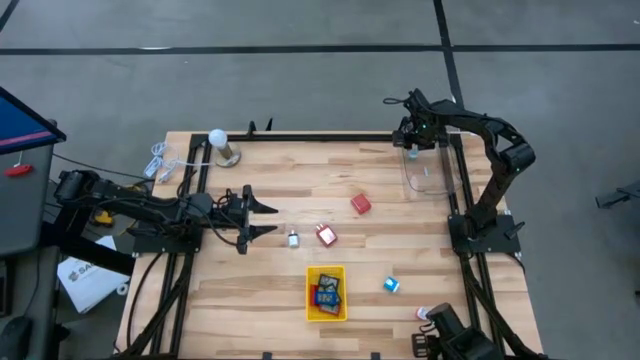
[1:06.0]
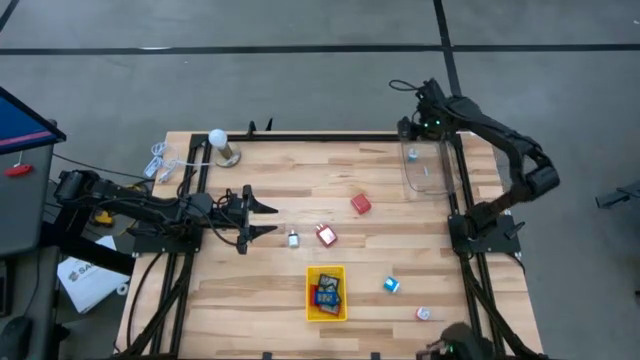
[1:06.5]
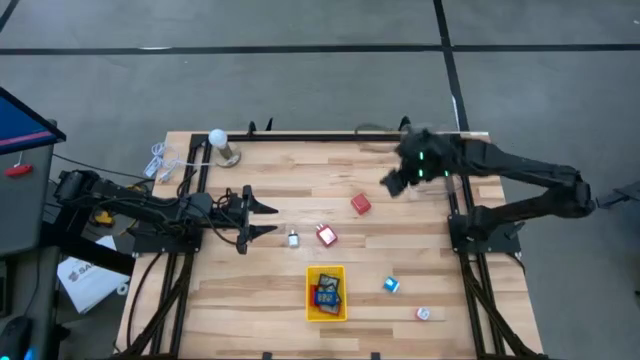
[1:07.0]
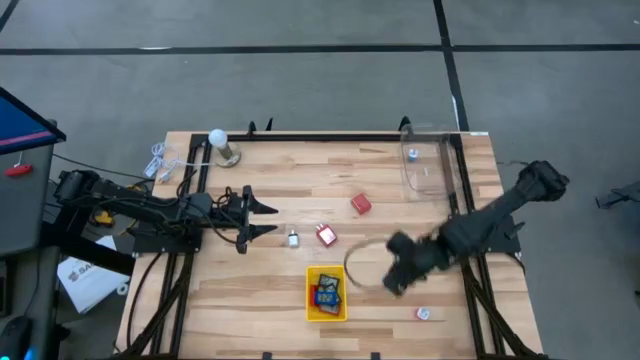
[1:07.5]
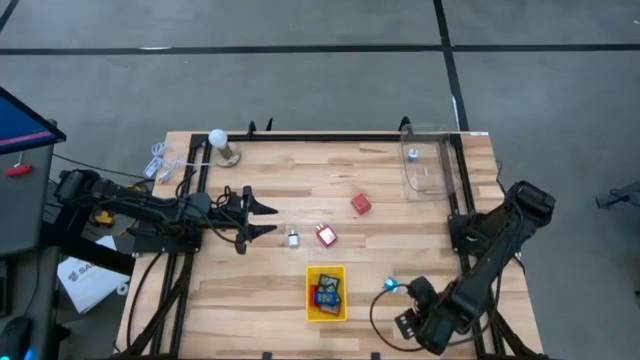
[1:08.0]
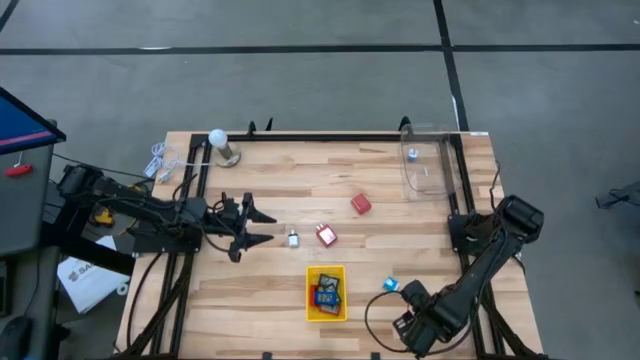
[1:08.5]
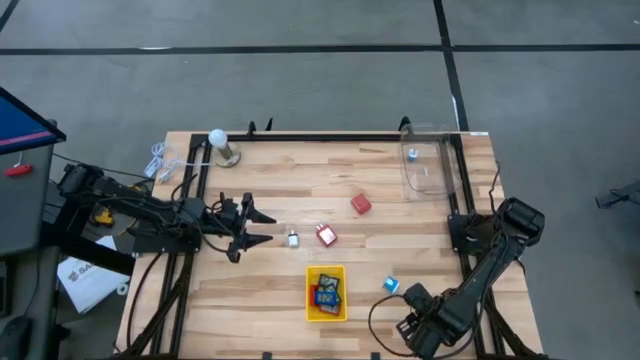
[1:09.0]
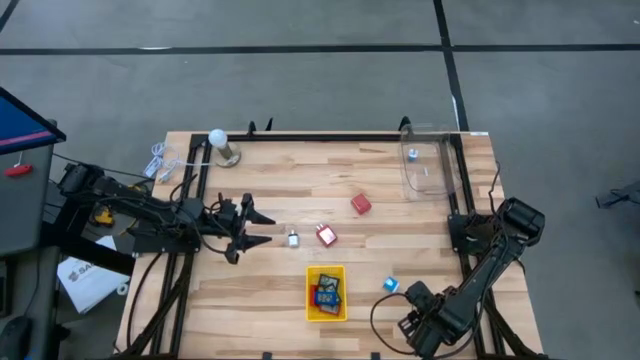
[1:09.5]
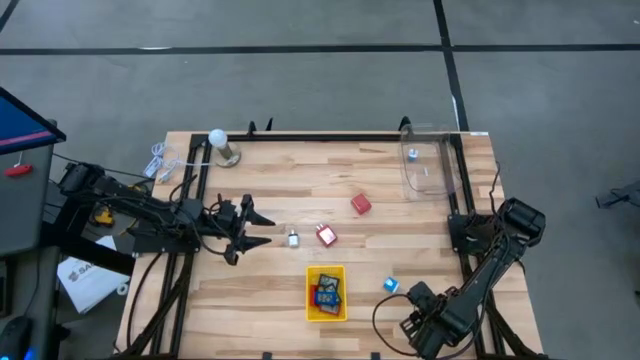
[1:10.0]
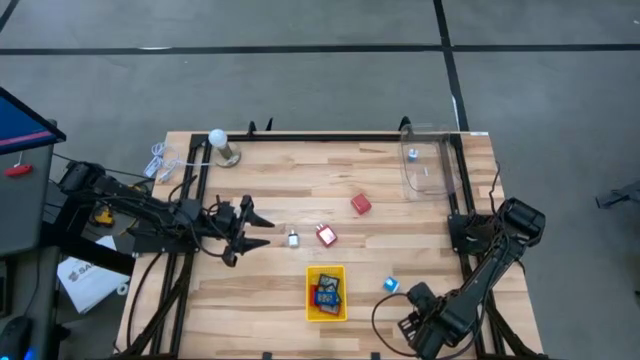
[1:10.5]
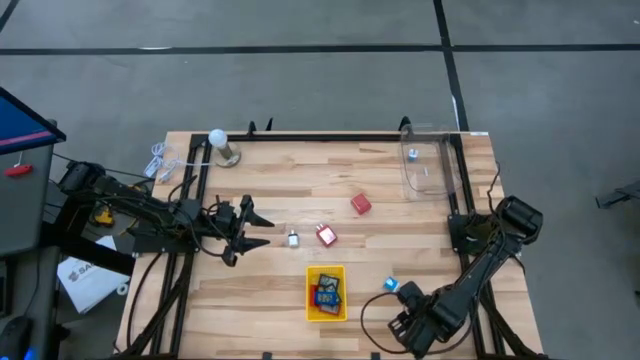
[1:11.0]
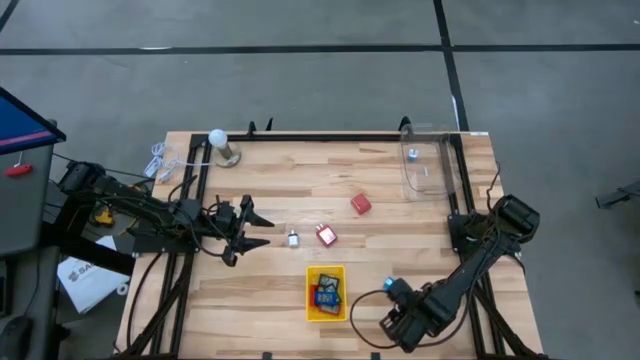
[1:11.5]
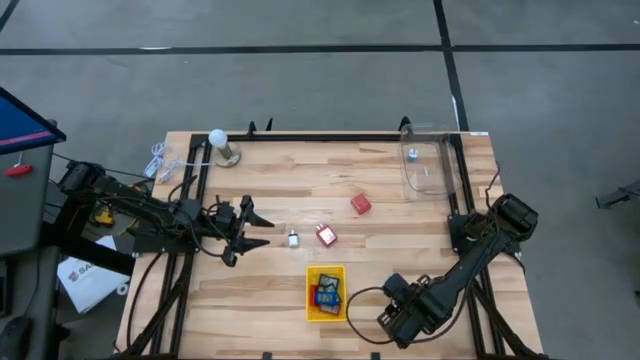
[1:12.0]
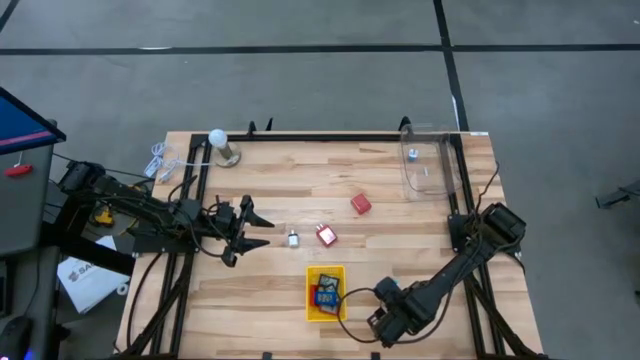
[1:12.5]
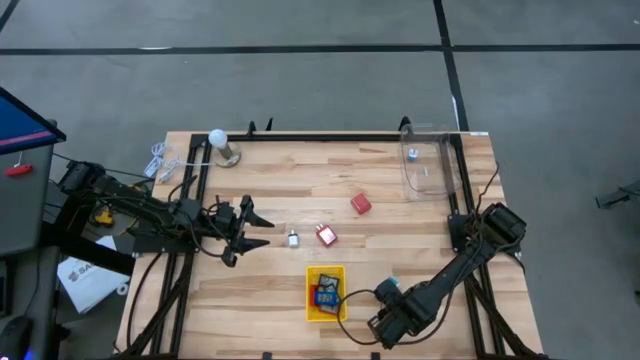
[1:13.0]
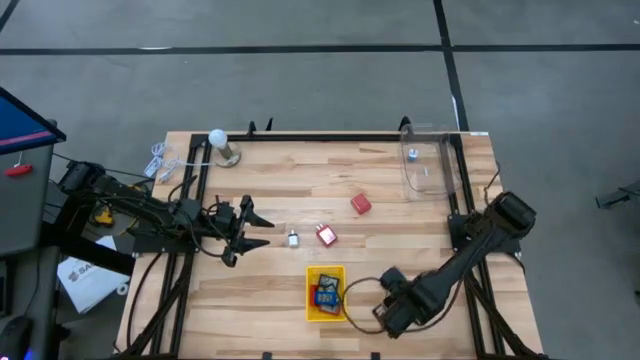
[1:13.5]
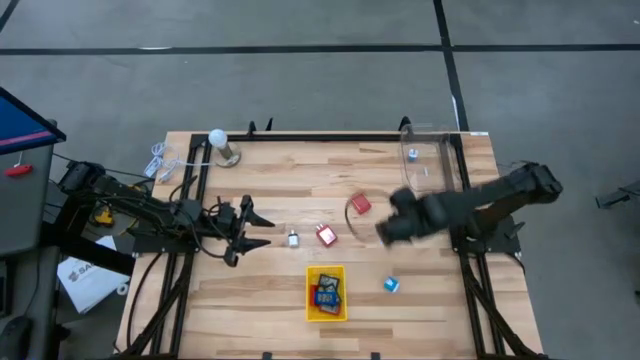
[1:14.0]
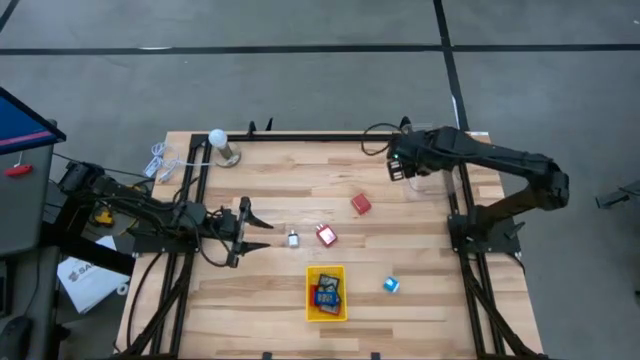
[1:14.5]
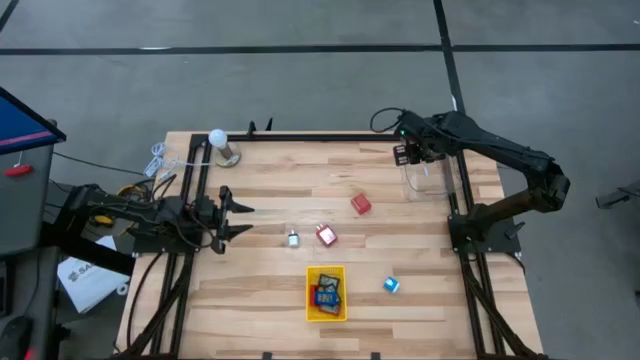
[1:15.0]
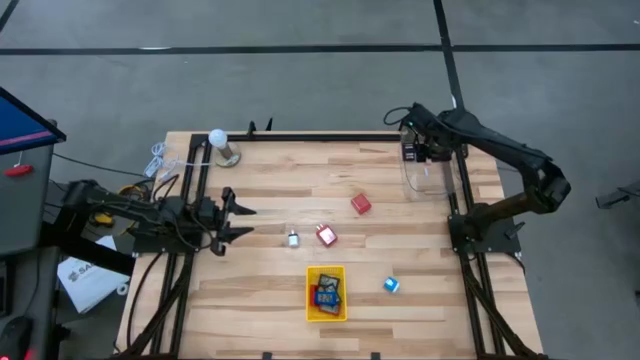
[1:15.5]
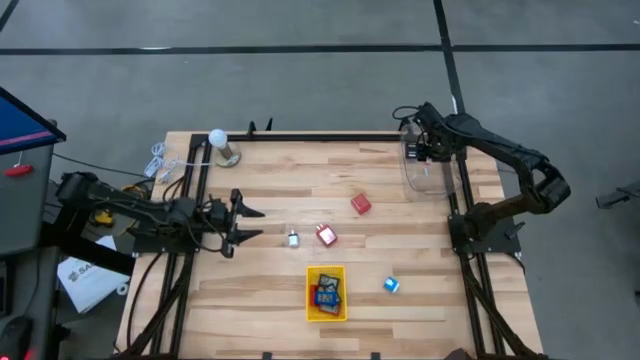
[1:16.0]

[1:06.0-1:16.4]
Task: Pick & Place Office items
Put the orange charger adapter into the transparent bin

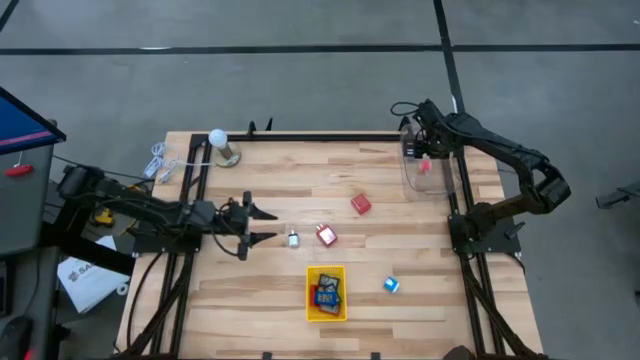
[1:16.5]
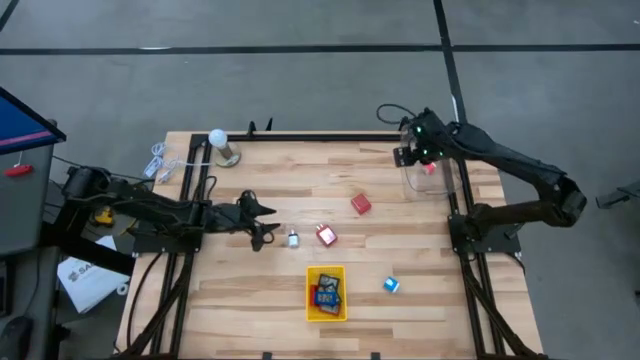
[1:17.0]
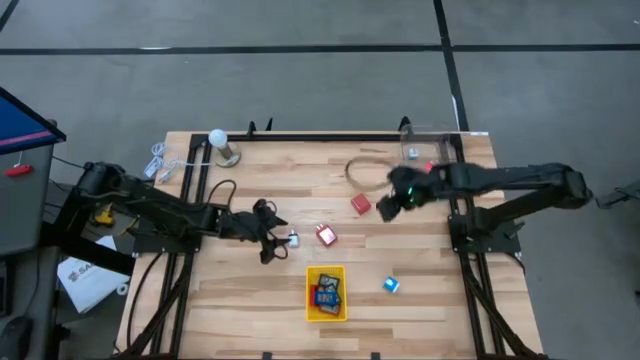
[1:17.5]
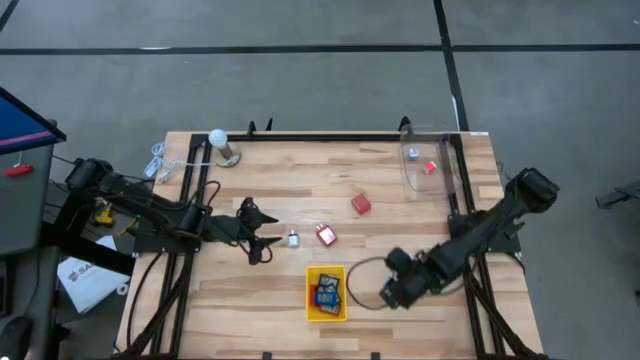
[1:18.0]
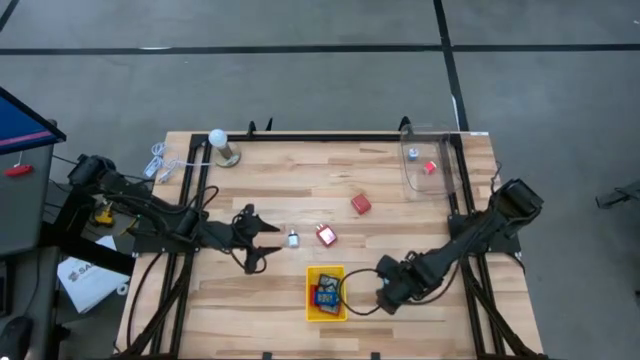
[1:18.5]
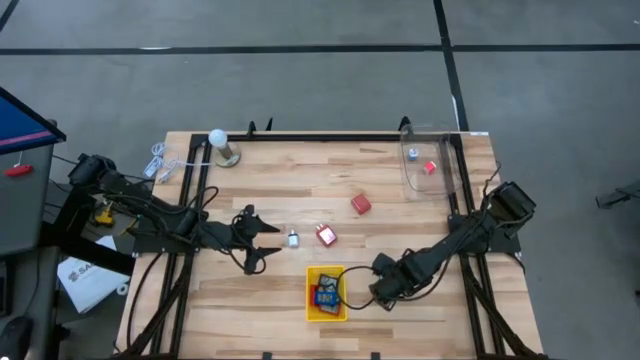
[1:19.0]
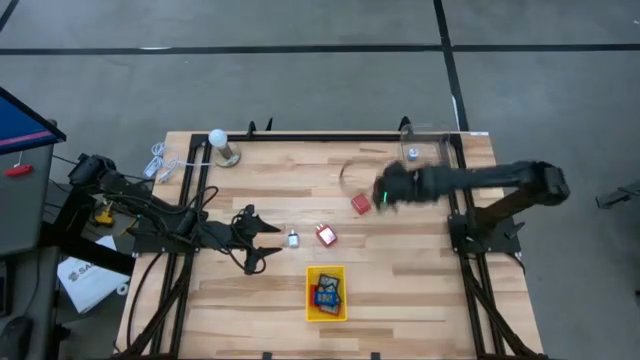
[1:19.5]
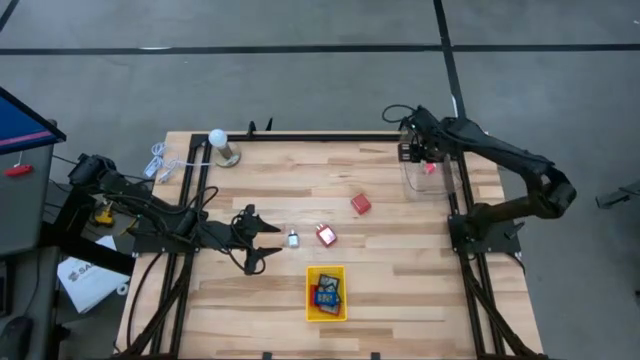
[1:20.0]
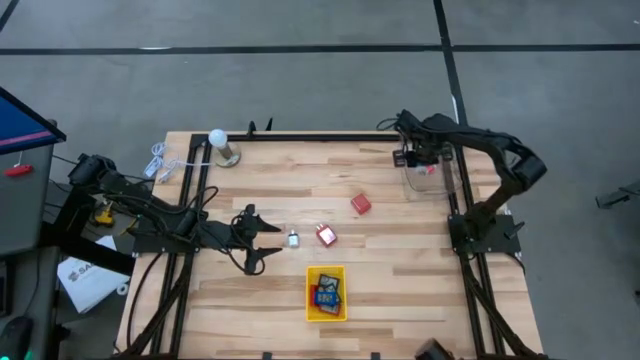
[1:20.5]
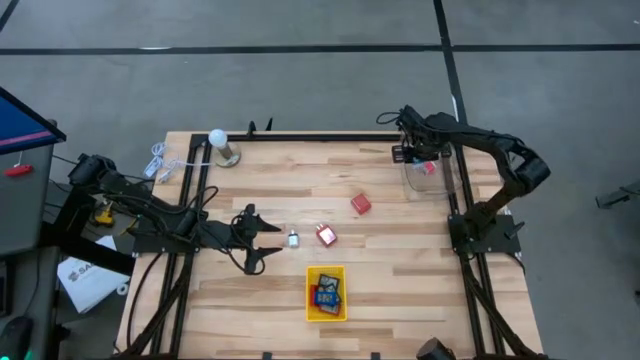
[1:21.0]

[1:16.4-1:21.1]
Put the blue charger adapter into the transparent bin

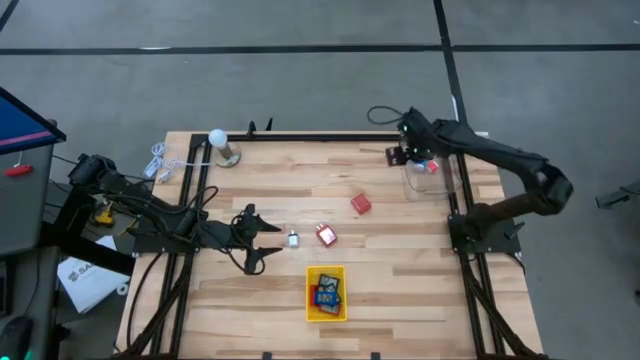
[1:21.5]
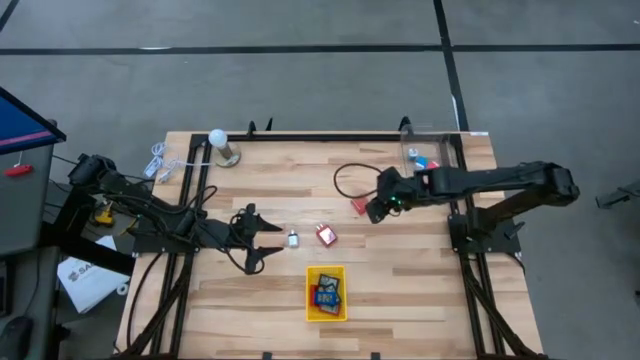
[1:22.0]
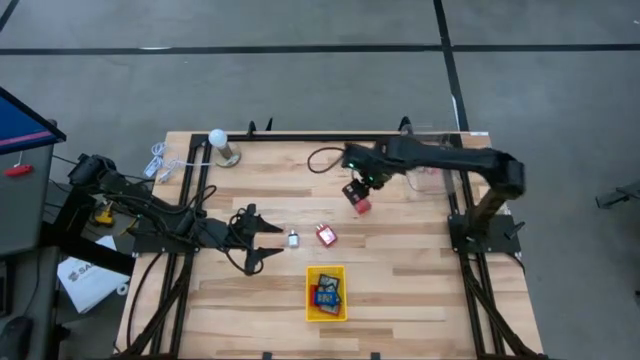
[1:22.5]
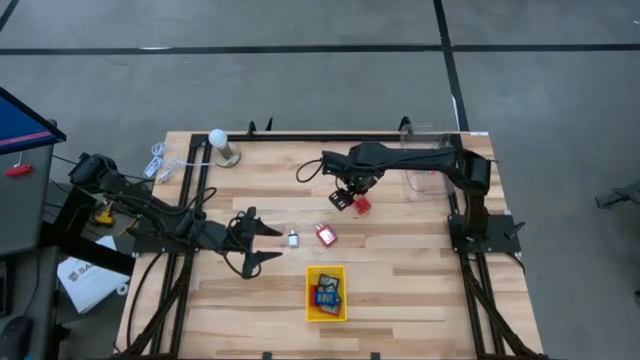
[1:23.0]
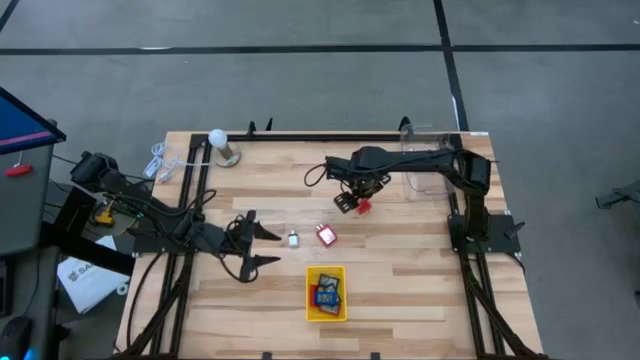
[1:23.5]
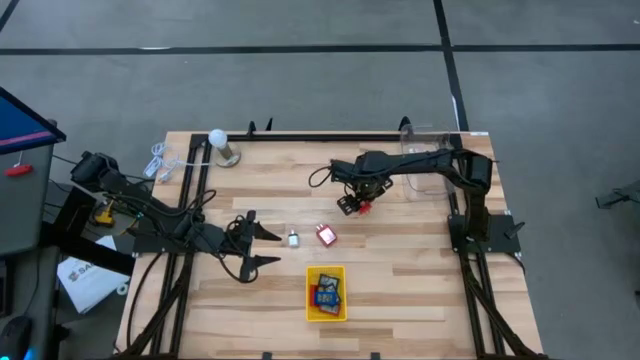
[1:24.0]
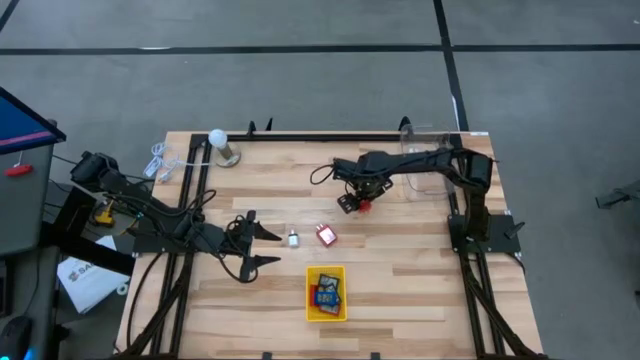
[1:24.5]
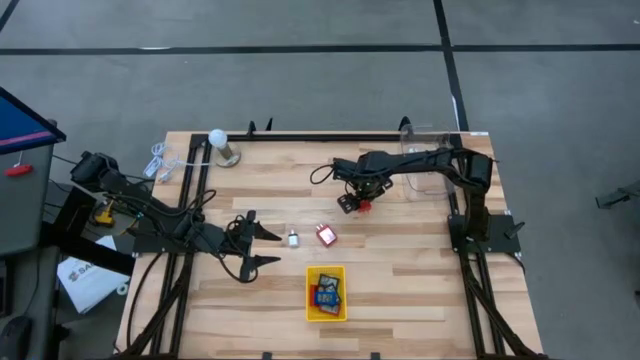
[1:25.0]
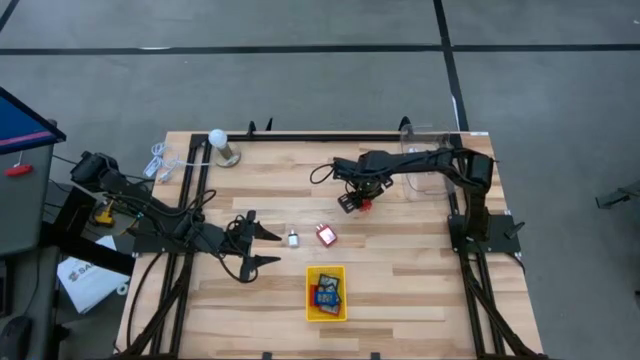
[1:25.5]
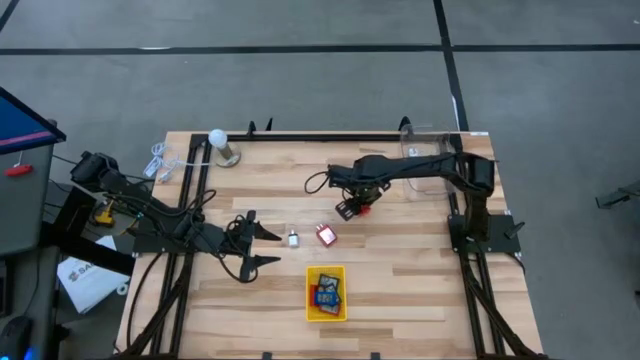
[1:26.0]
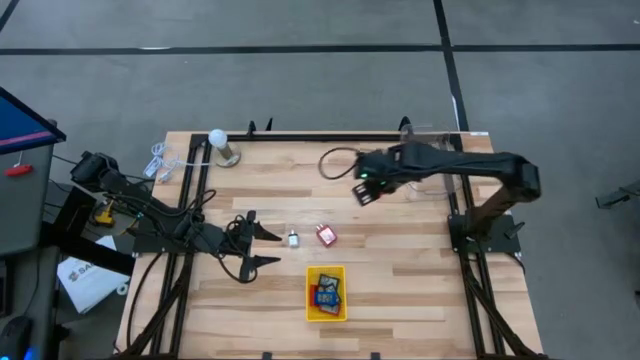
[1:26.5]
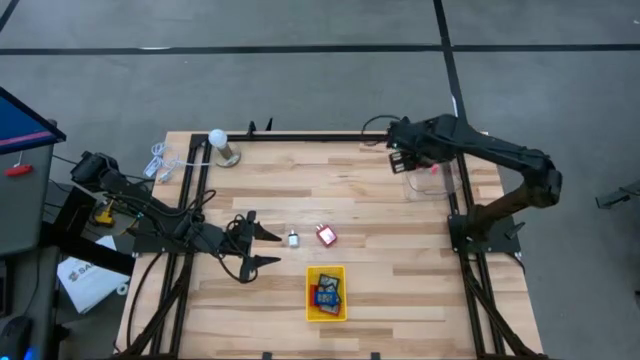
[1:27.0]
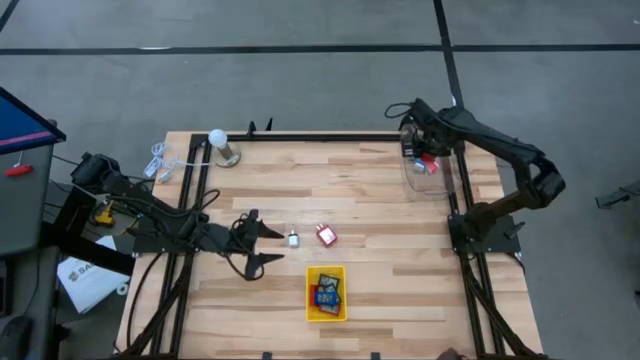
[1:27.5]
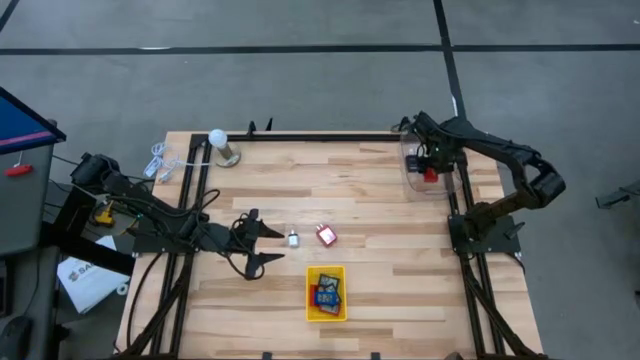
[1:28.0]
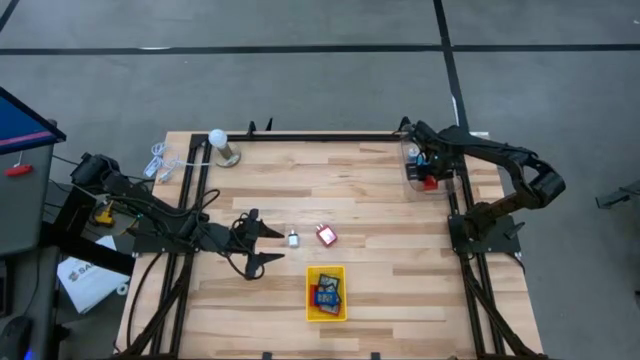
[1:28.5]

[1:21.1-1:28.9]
Put the right red charger adapter into the transparent bin
